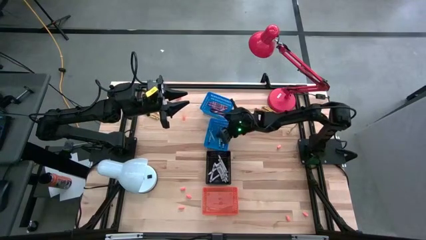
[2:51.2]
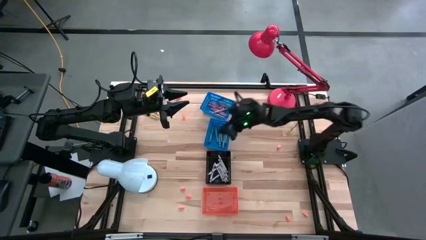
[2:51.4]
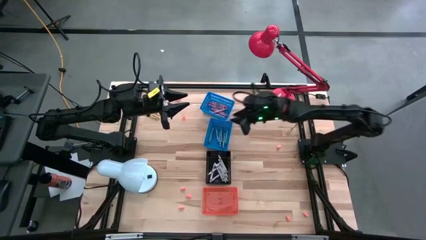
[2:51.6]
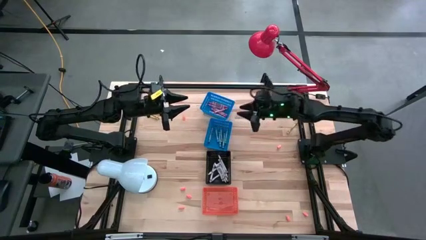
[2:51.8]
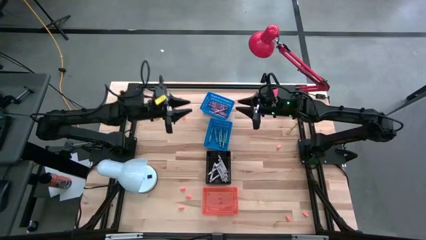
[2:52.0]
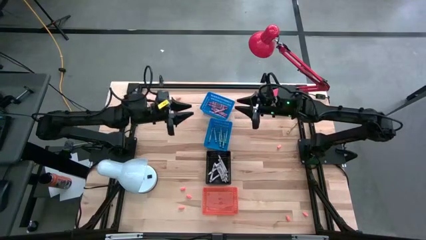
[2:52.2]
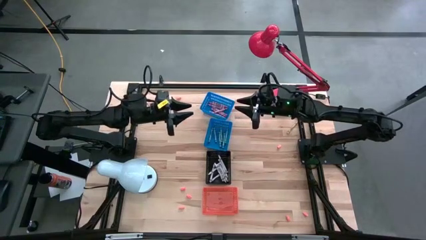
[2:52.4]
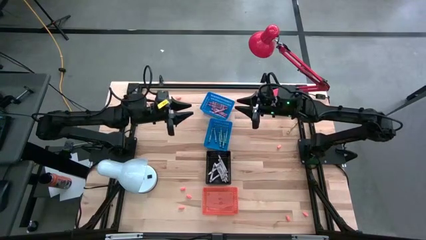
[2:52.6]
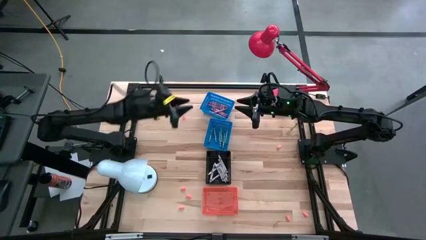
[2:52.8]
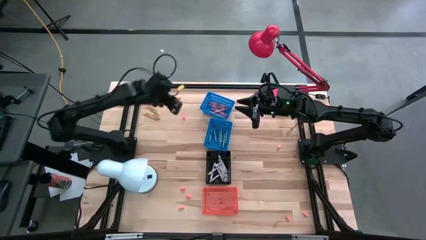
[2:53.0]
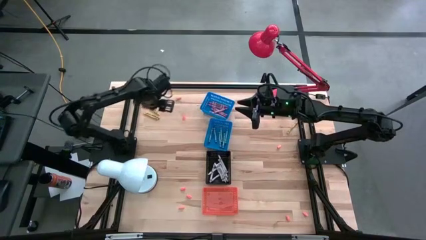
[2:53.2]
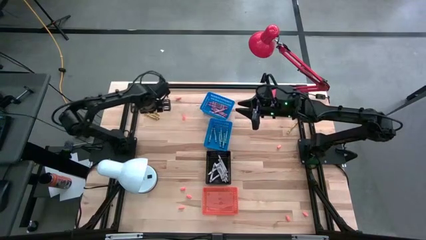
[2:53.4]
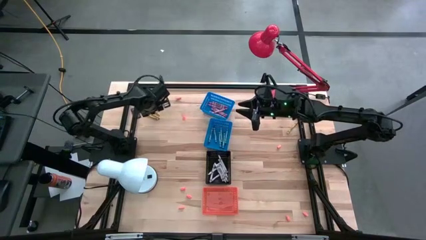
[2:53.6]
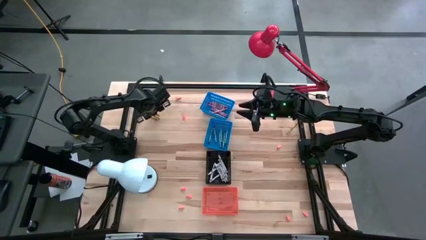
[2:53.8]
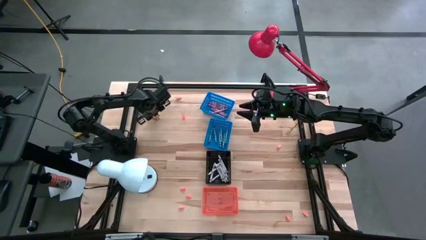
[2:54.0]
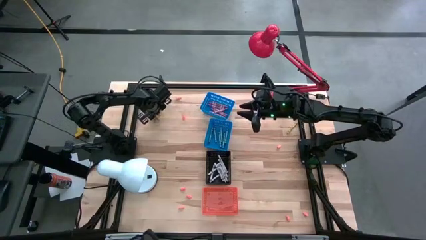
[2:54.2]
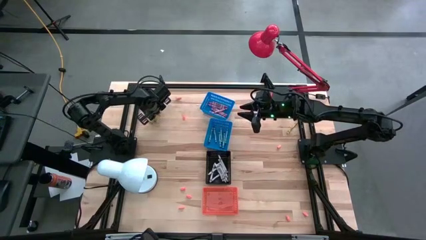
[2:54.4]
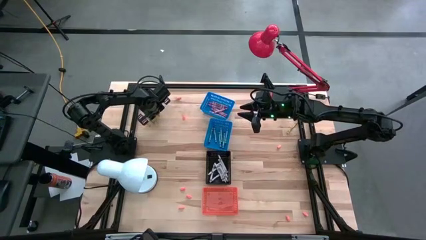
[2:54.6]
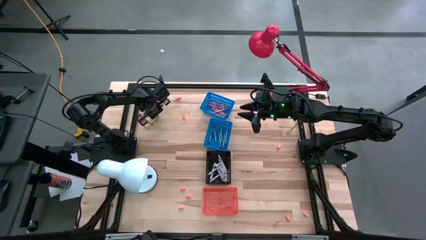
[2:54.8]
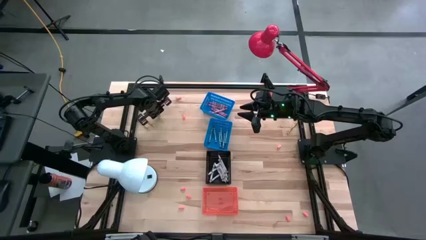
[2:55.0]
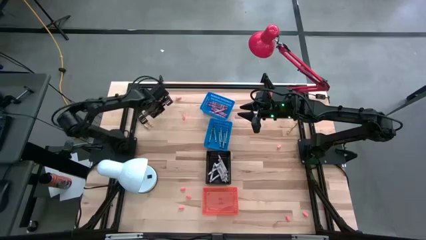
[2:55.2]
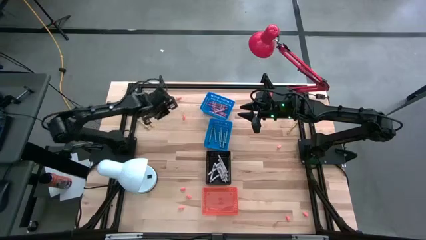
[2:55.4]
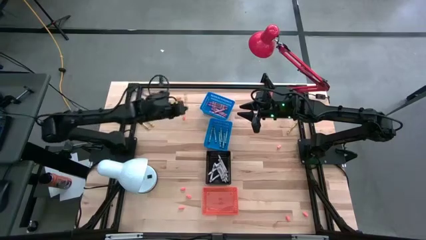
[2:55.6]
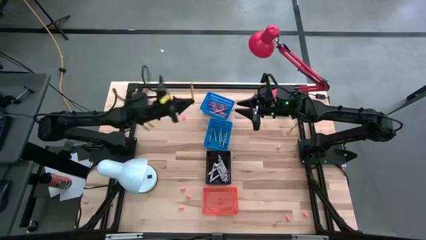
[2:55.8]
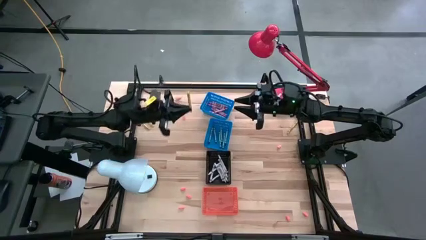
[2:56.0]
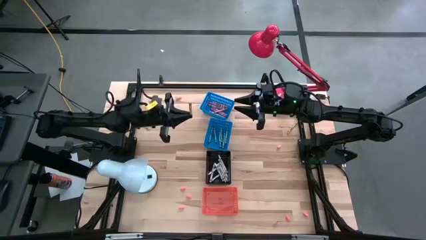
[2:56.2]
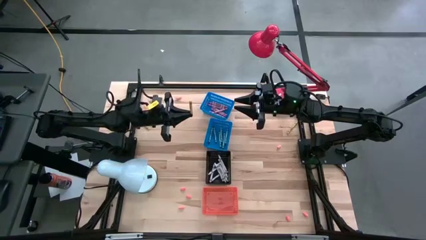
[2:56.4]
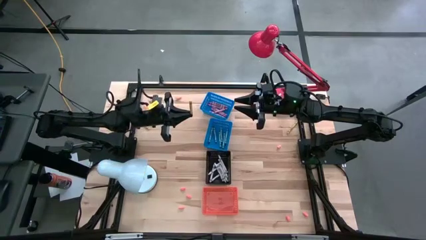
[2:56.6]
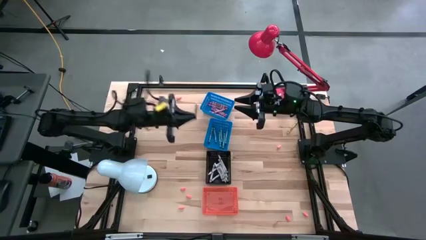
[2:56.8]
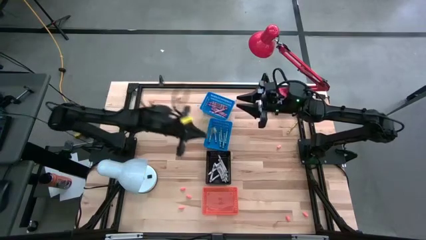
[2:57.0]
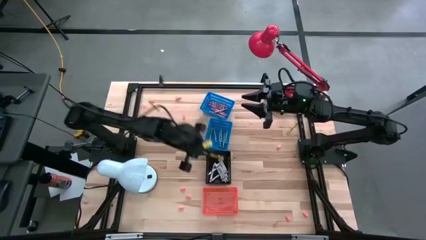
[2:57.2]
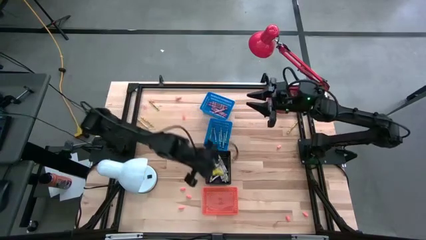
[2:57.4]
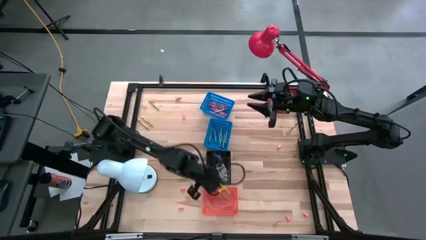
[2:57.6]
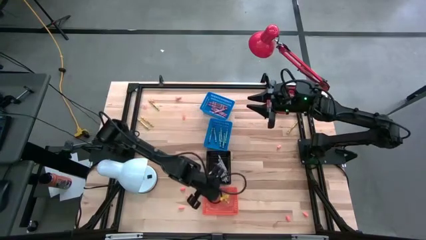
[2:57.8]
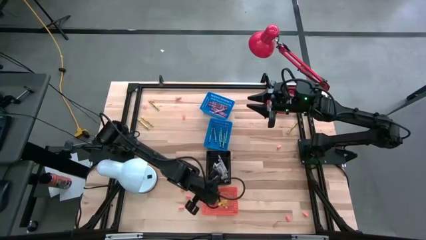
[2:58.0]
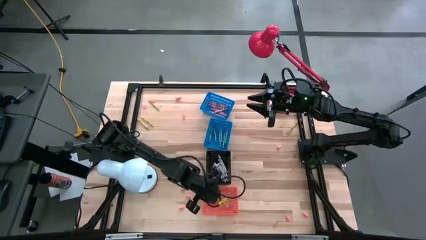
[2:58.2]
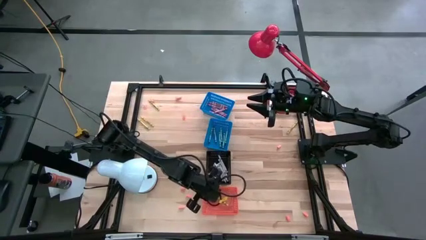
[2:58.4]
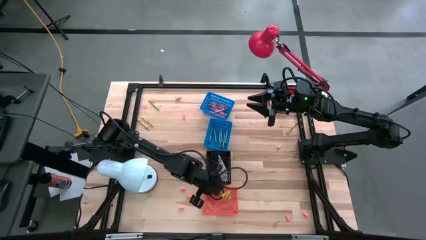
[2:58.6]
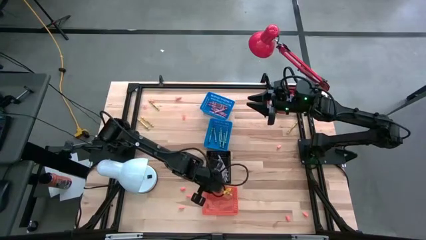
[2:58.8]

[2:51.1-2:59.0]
Task: Sort crayons
Put the yellow crayon into the orange bin

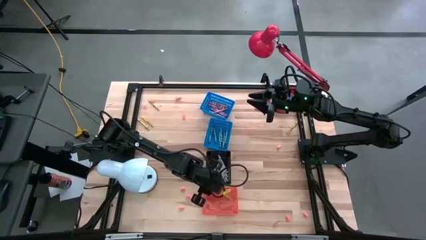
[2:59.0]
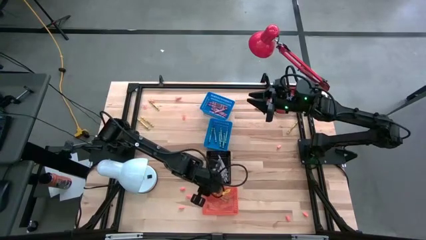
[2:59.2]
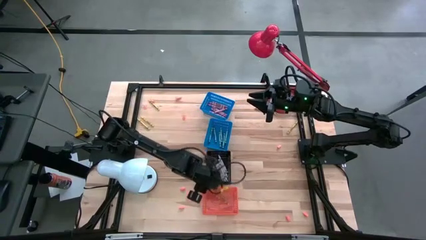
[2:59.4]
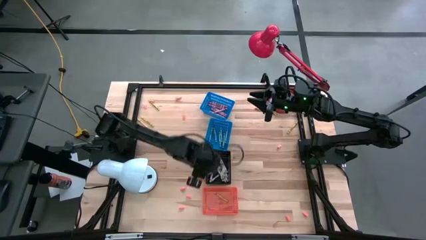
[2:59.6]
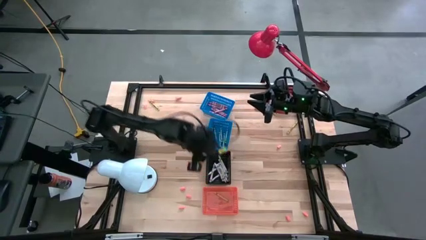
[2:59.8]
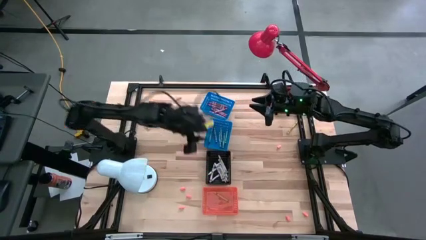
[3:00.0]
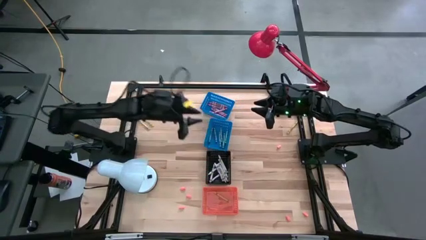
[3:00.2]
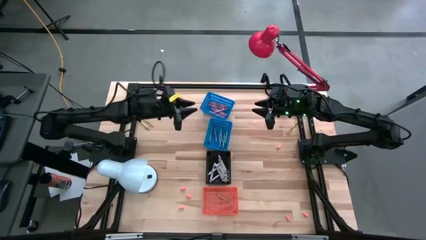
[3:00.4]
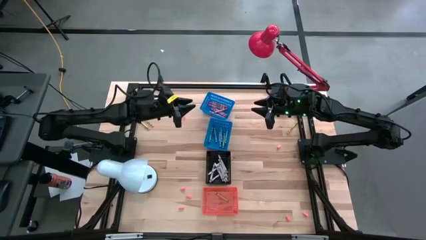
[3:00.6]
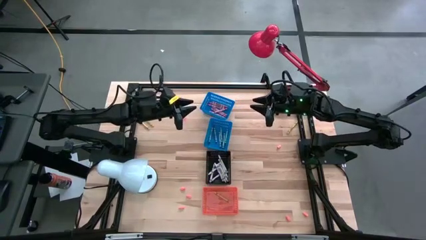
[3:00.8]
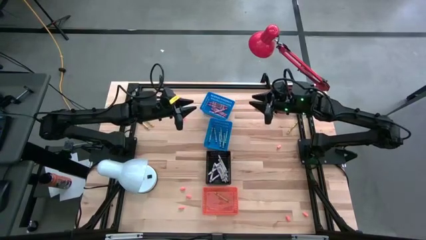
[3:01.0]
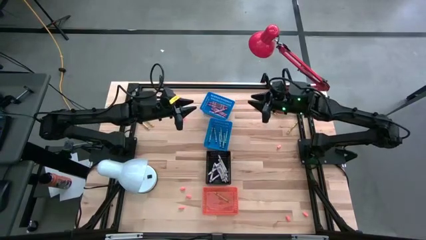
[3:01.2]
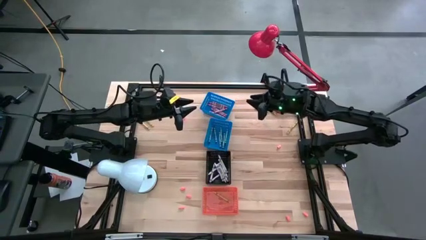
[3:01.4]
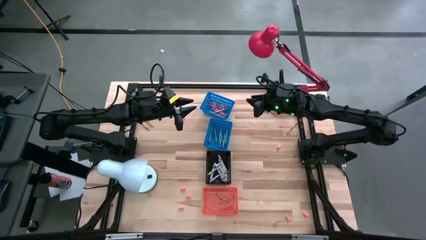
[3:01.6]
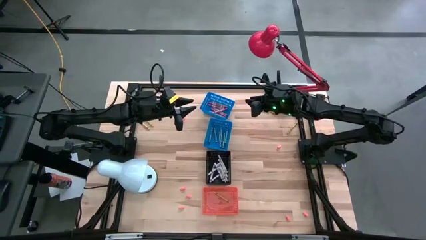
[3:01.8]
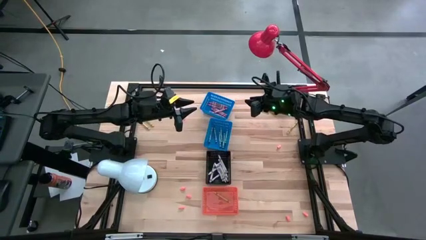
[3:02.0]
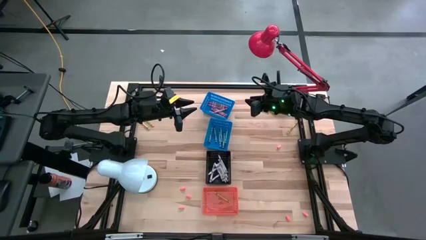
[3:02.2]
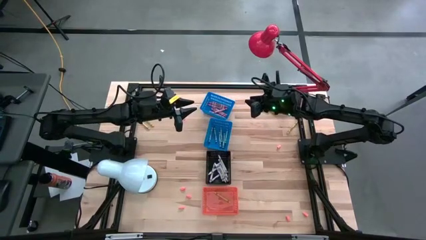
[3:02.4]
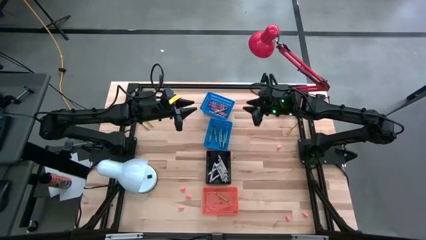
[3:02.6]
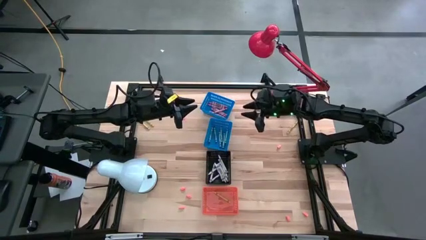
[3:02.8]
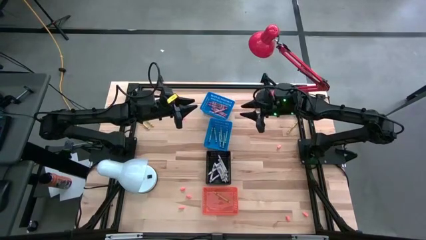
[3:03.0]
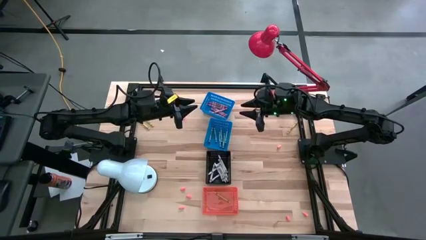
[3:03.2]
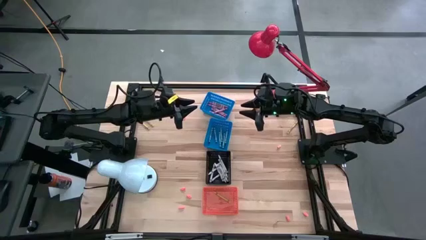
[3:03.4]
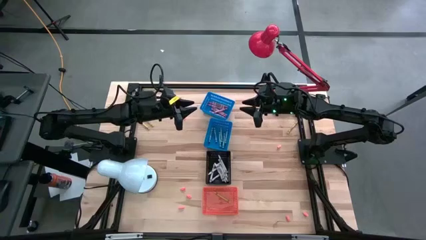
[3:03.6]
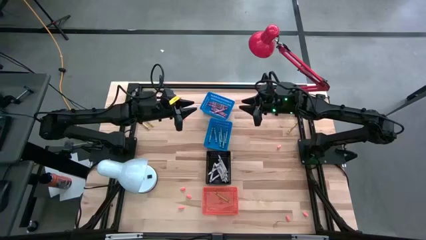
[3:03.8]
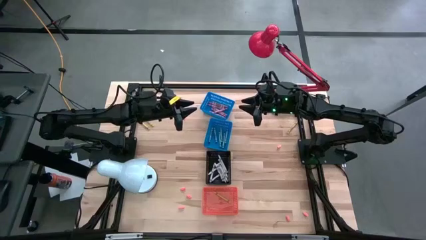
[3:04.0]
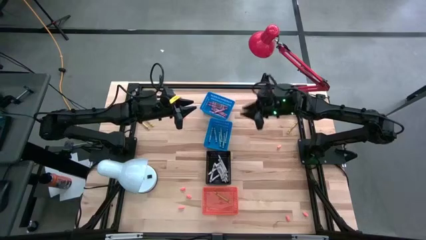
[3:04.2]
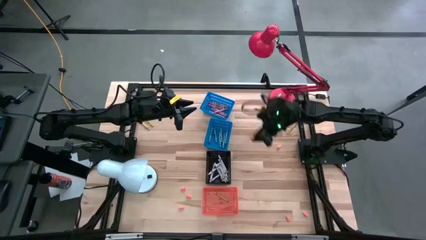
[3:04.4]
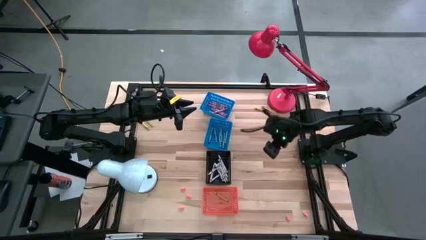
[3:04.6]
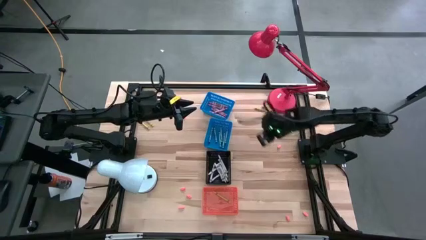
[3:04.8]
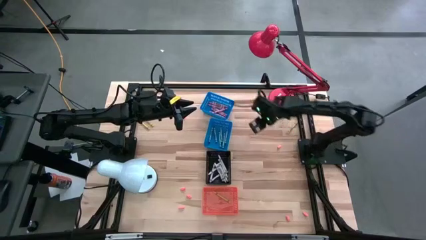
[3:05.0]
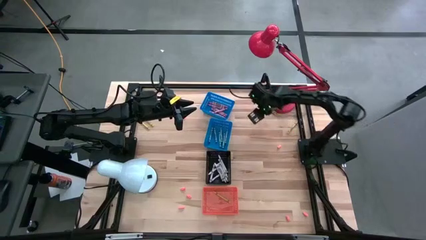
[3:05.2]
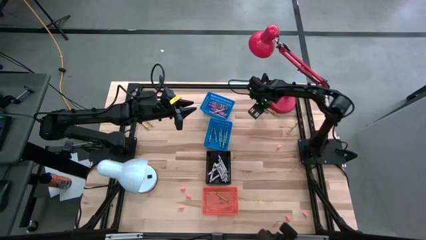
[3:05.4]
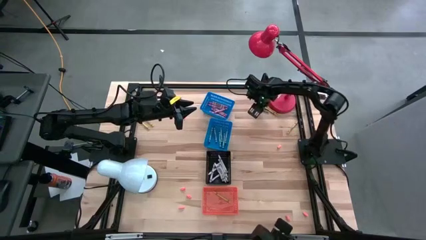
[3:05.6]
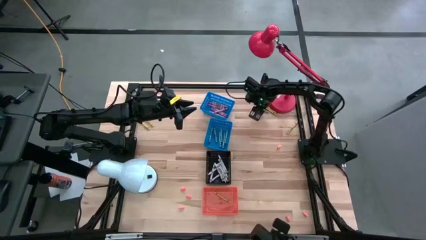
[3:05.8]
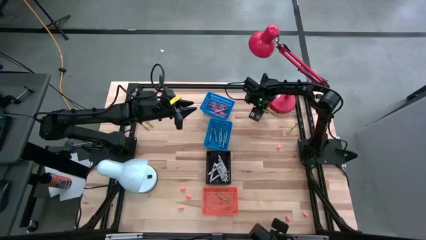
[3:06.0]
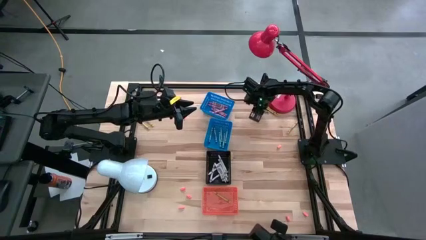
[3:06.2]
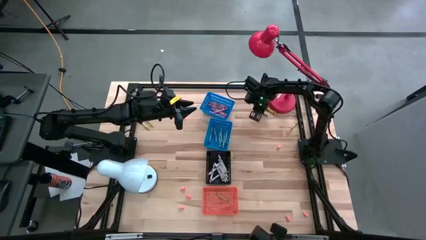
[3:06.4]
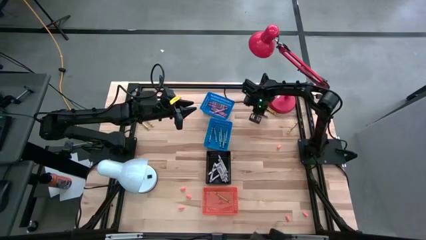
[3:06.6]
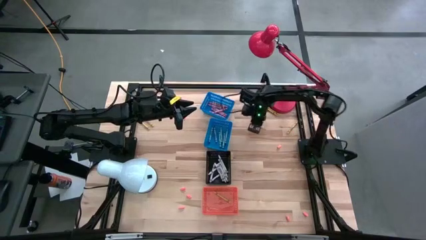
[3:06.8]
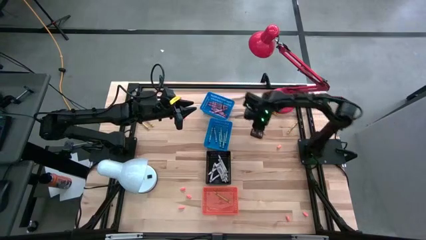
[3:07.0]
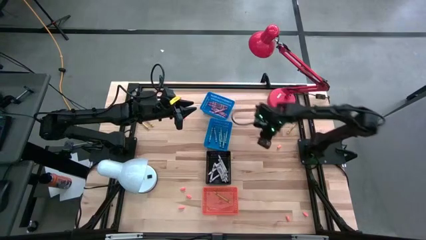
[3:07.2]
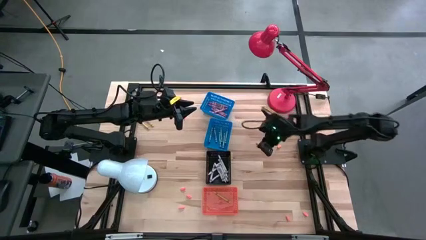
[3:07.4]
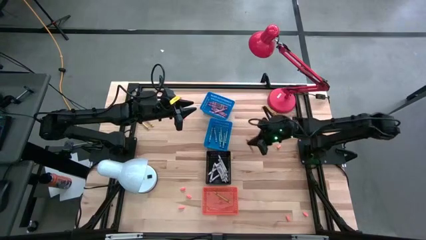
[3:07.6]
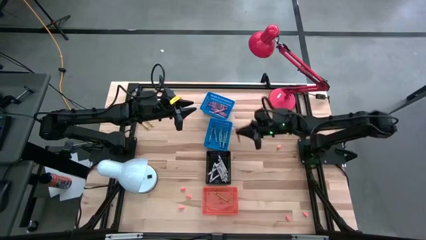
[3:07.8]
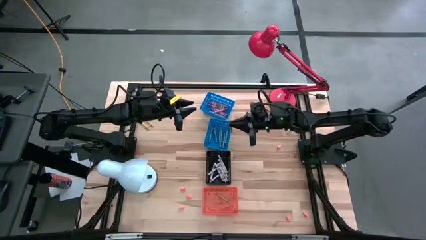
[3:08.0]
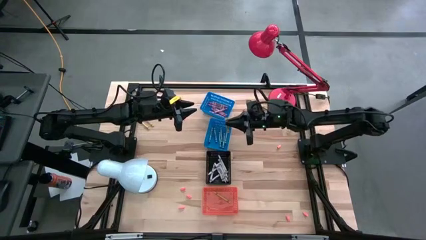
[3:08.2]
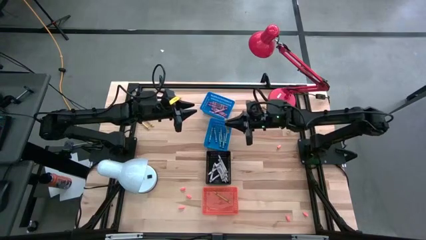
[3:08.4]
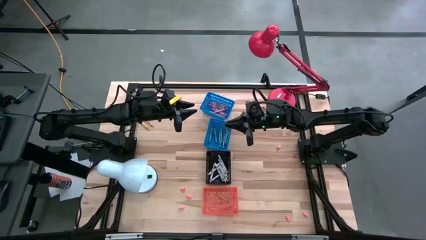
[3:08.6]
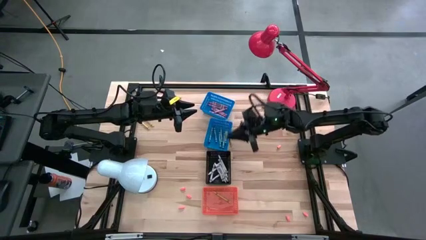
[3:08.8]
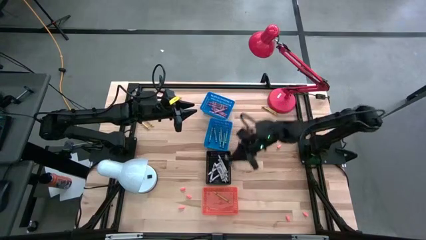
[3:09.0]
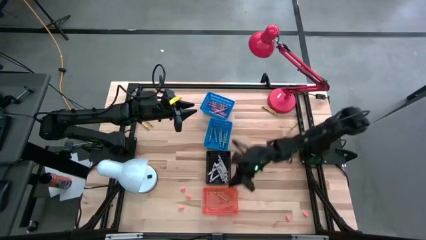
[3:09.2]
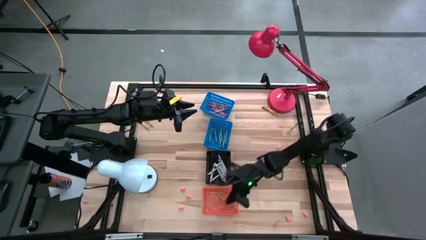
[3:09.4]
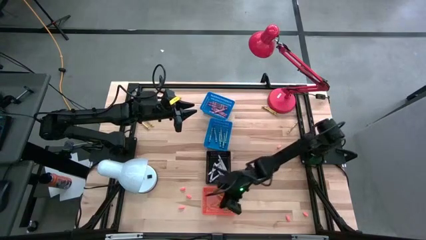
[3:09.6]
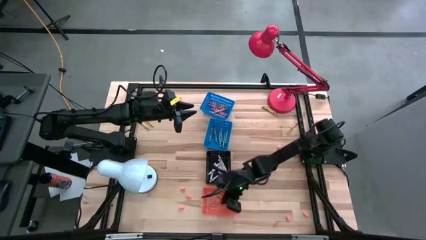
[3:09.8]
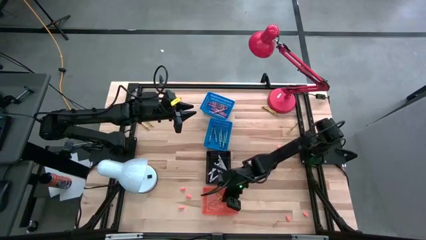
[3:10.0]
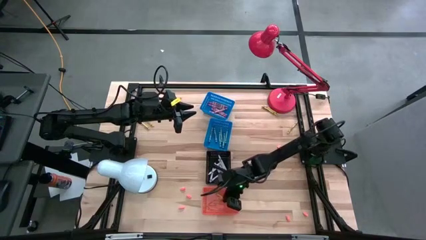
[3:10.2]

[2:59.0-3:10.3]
Put the yellow crayon into the orange bin
